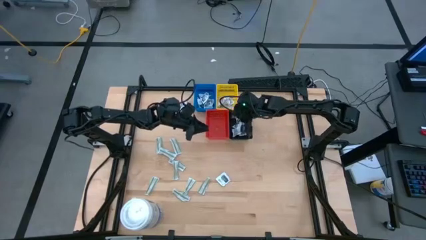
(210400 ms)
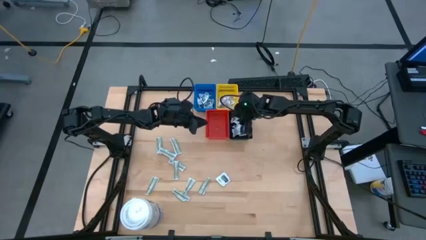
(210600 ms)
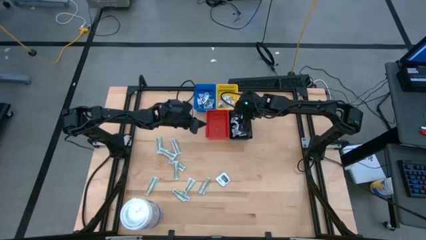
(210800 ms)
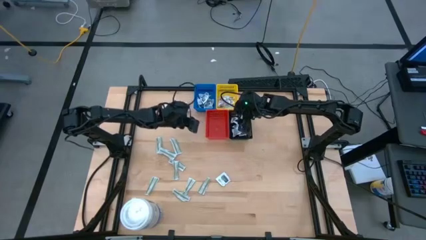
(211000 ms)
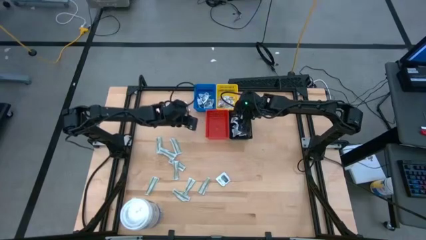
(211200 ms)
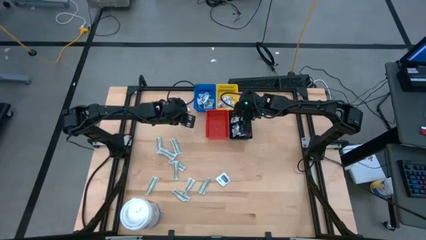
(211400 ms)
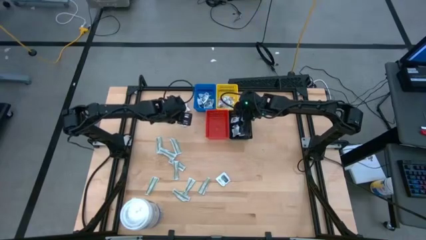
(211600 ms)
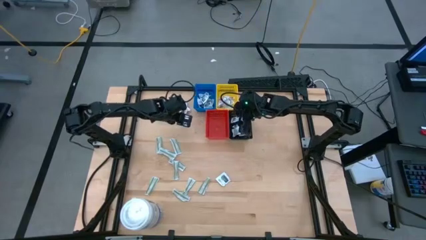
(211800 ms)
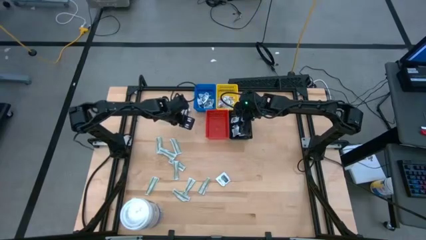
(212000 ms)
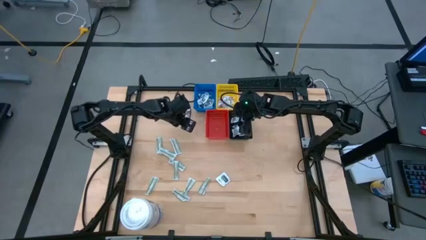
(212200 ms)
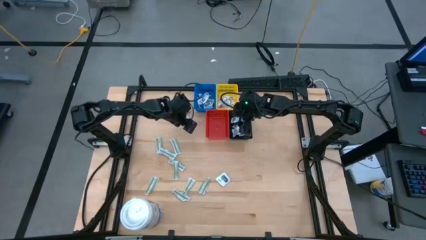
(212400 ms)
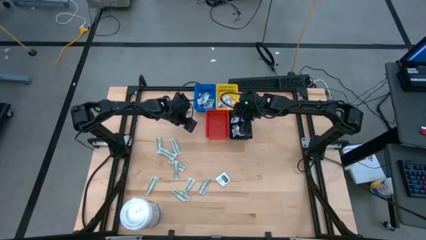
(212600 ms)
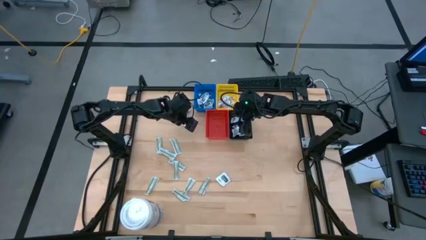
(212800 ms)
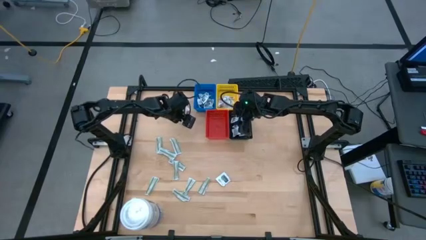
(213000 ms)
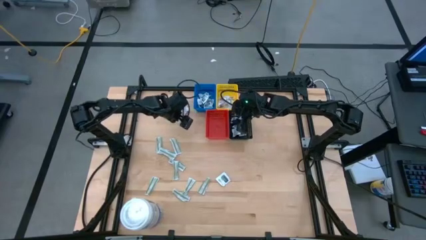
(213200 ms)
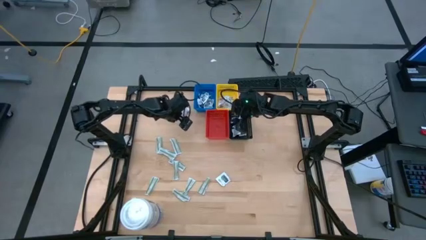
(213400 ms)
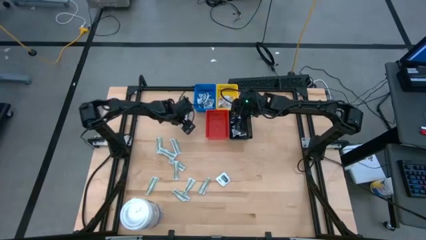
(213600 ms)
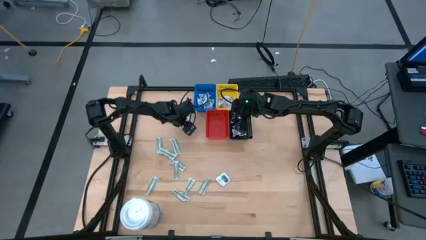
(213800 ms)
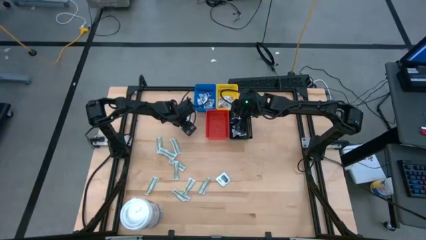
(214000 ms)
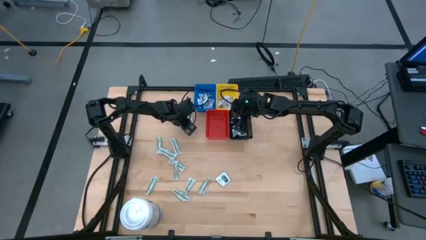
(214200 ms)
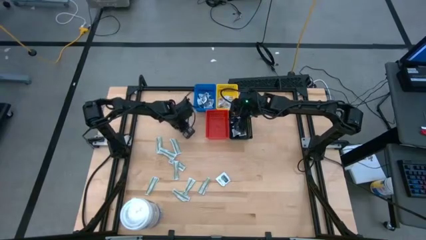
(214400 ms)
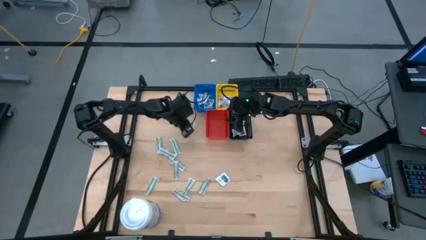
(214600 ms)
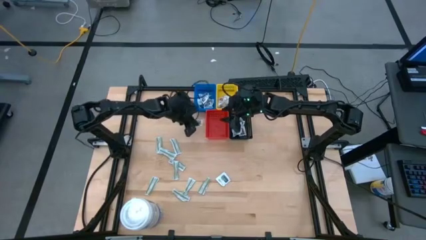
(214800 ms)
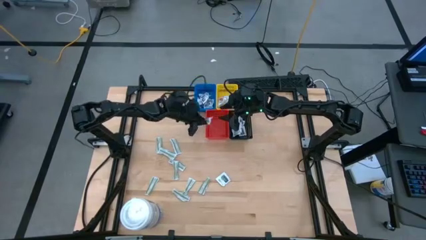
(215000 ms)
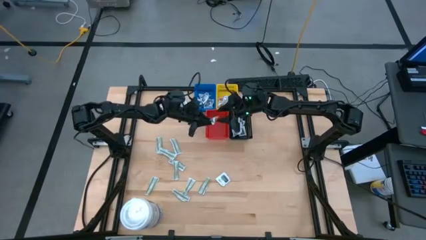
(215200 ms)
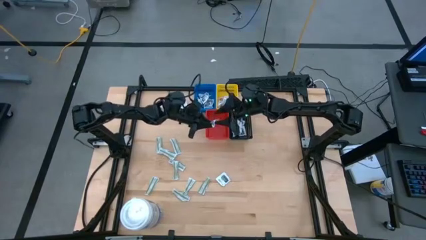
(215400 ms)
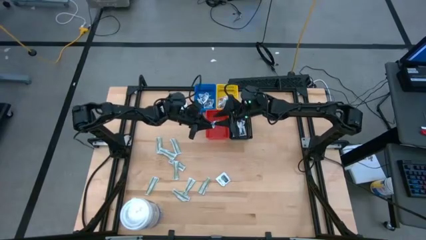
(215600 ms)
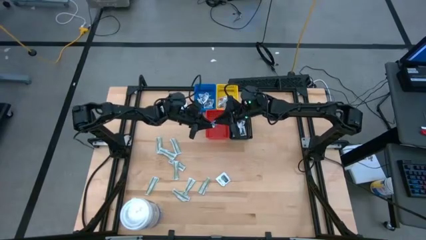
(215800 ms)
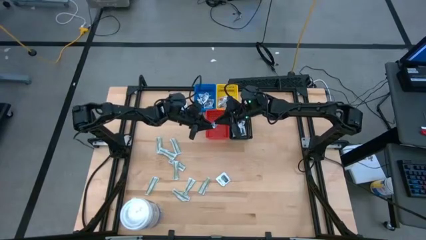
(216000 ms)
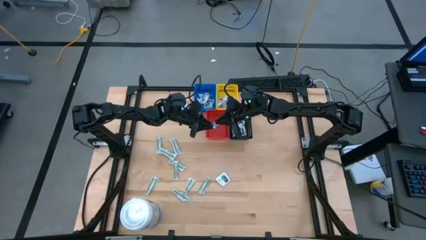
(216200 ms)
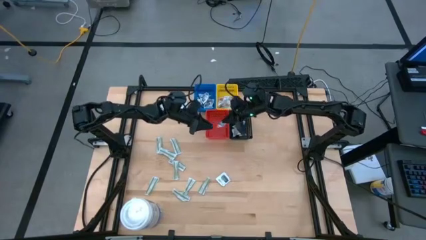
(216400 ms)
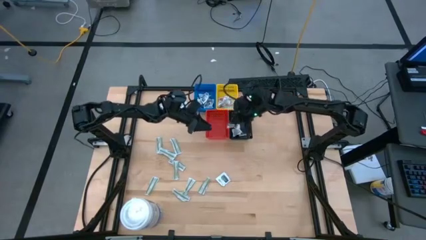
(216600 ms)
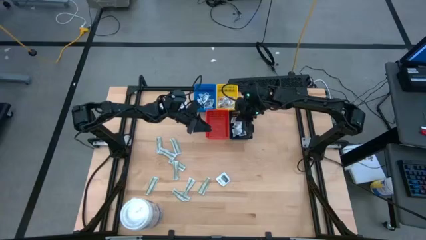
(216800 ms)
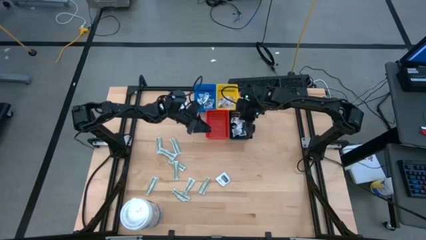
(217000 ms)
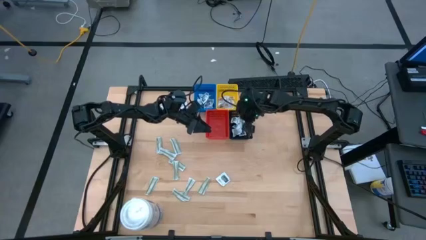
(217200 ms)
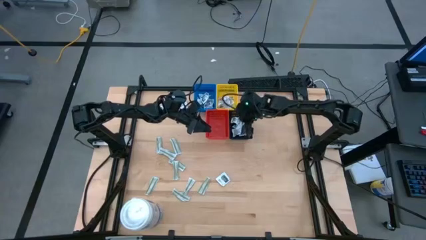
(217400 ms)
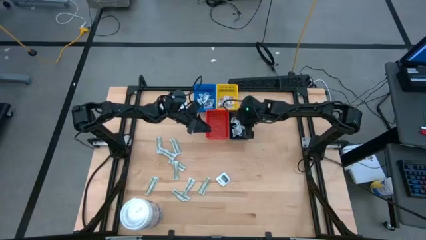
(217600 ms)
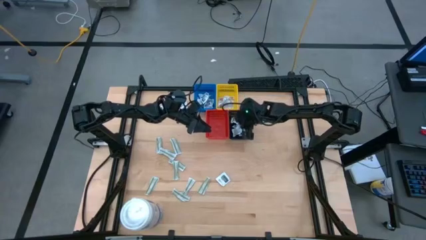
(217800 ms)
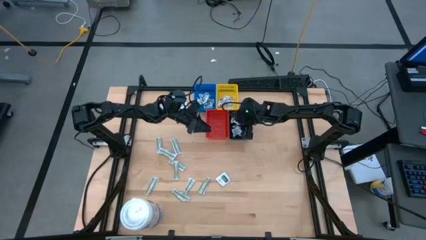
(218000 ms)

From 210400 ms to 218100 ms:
Task: Pick & Place First Aid Supplies
Put the towelette pack into the black bin

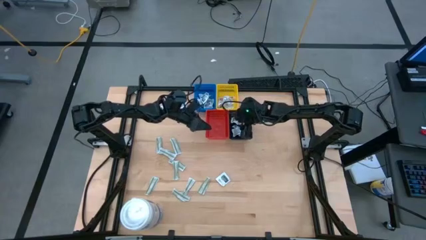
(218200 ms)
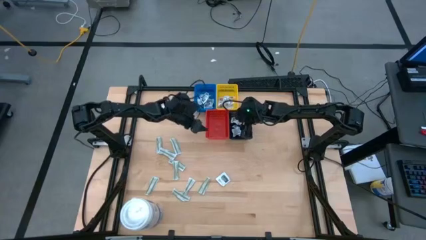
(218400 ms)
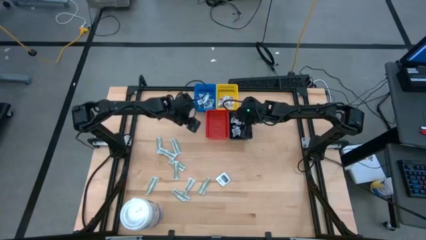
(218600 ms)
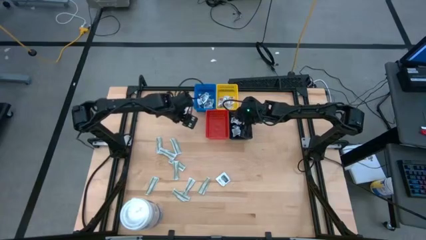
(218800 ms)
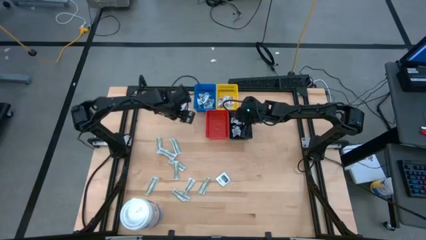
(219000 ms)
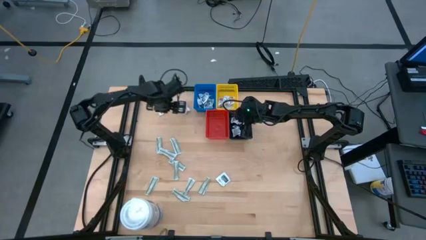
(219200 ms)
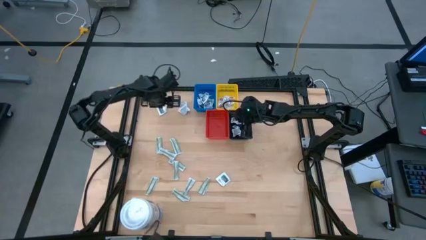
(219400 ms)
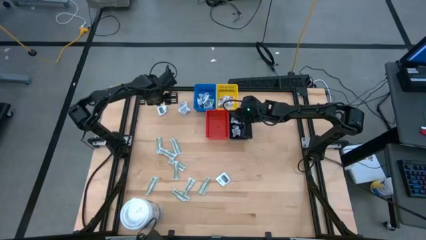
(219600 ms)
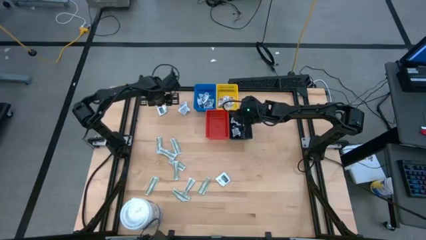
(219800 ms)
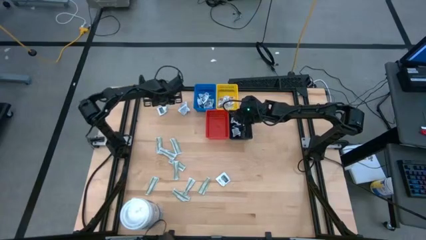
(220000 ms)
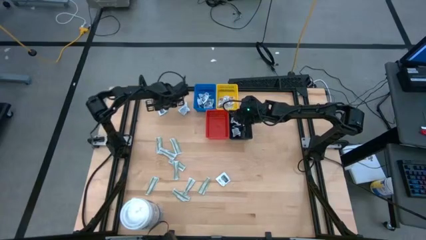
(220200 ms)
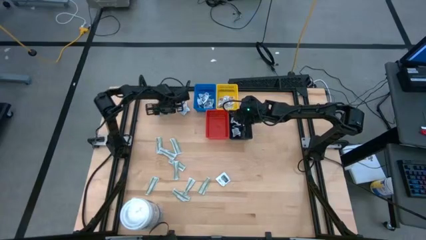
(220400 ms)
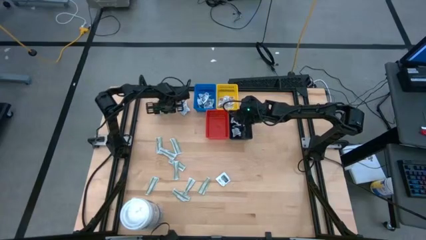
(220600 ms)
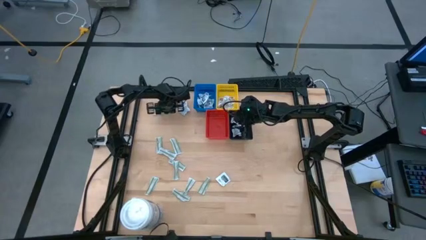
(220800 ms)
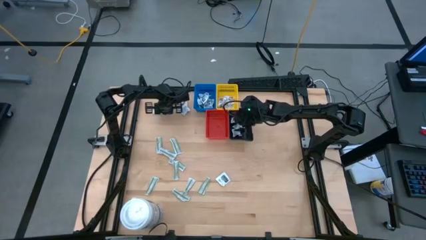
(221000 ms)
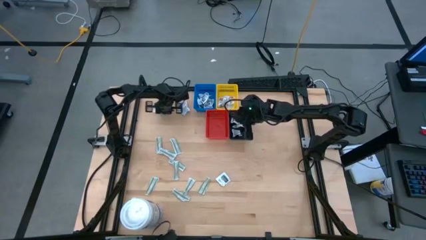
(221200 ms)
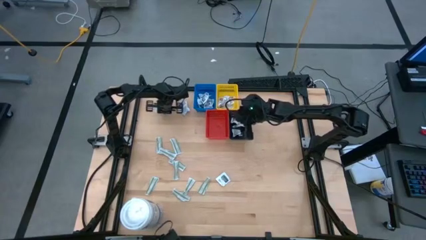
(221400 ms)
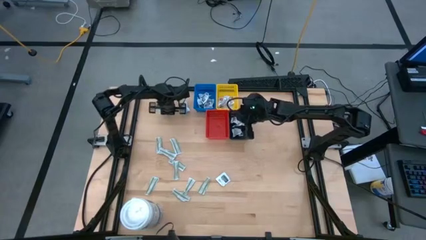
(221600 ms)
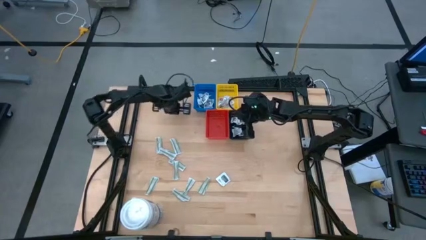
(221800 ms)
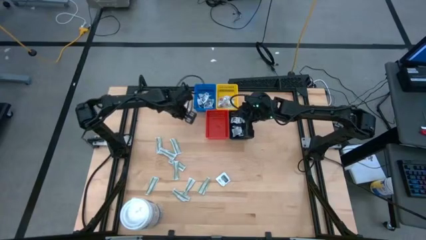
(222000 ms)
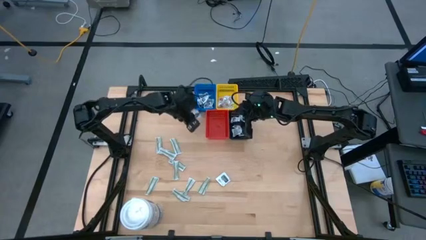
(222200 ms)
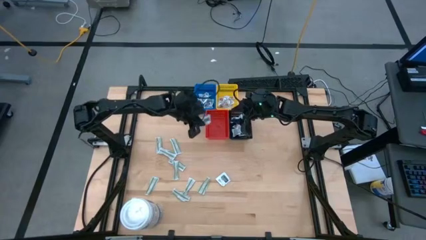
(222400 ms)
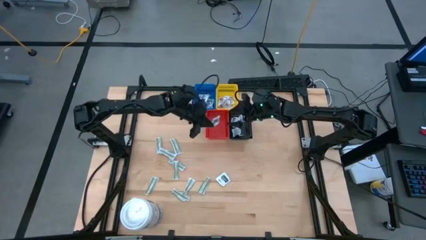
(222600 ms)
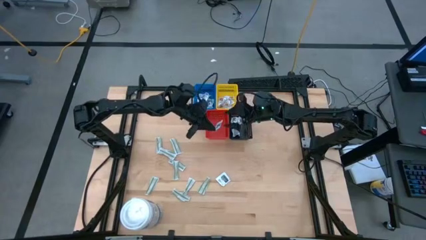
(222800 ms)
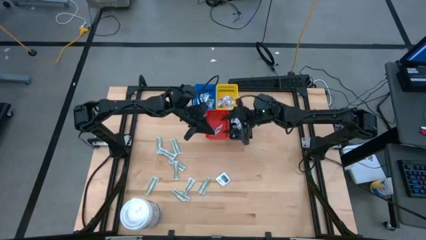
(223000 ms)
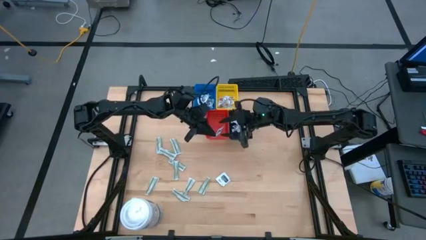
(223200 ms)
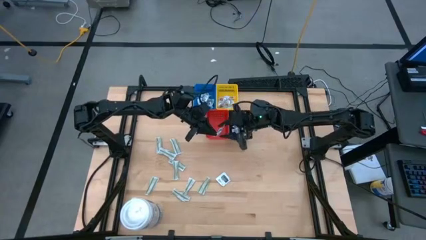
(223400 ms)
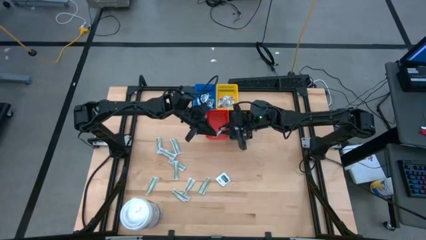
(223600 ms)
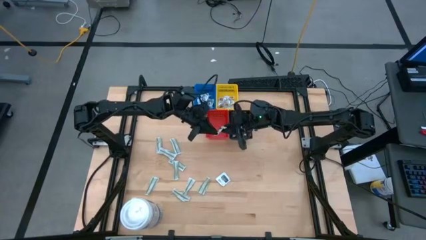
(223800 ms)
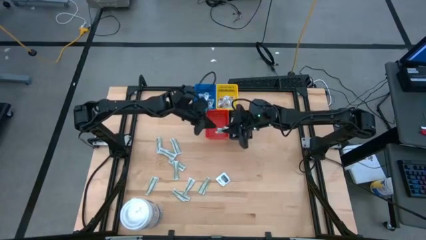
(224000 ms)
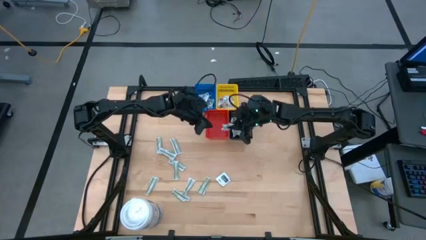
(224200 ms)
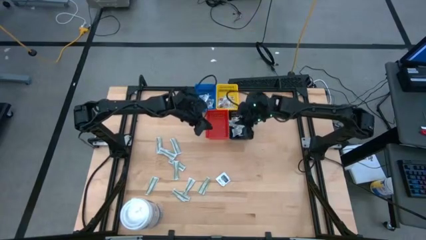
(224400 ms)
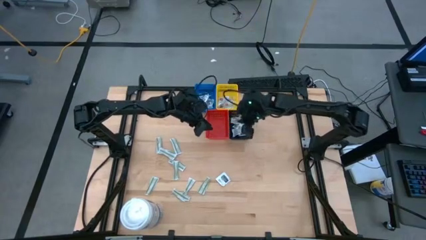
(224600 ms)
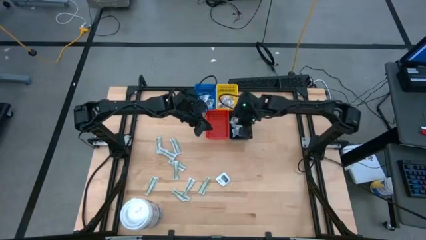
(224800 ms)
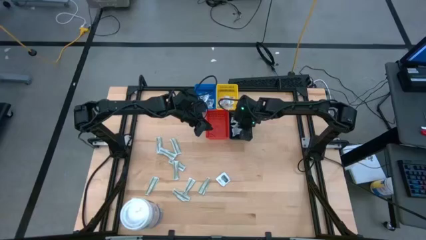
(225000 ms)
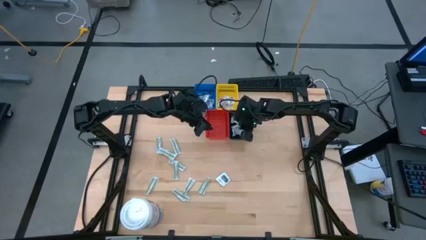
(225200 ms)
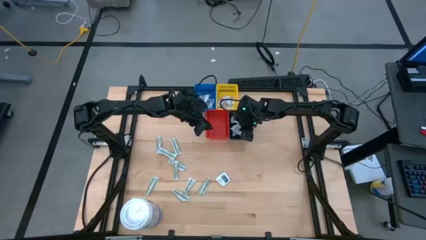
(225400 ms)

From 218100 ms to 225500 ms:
Put the towelette pack into the black bin
